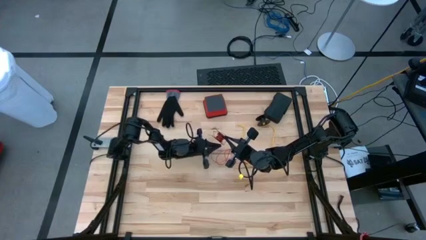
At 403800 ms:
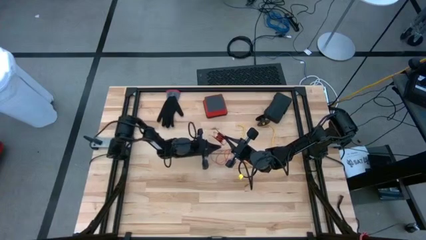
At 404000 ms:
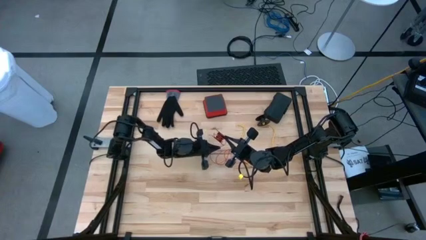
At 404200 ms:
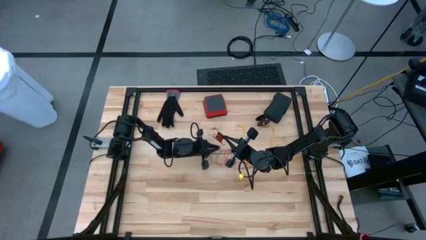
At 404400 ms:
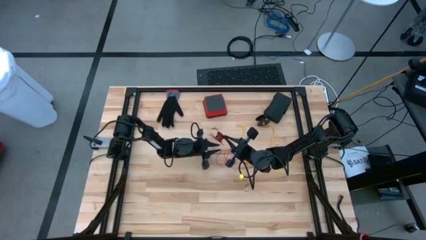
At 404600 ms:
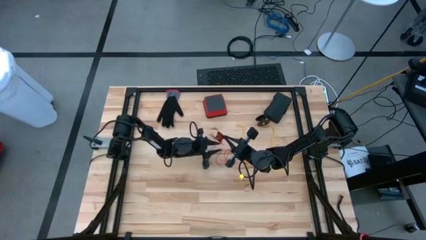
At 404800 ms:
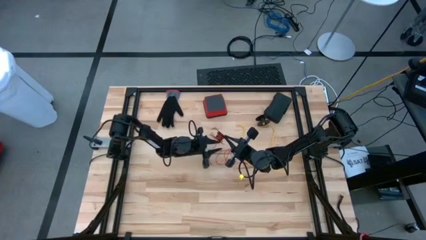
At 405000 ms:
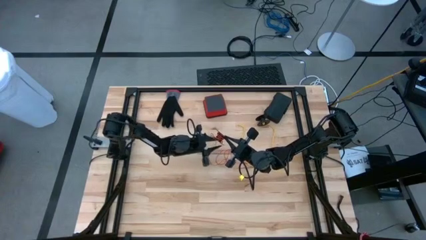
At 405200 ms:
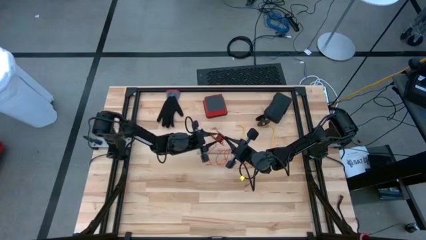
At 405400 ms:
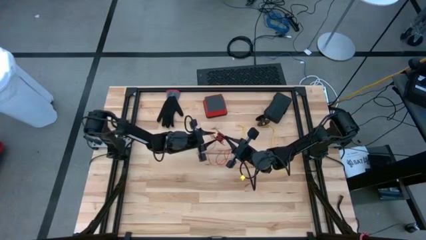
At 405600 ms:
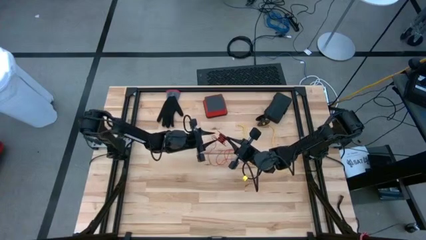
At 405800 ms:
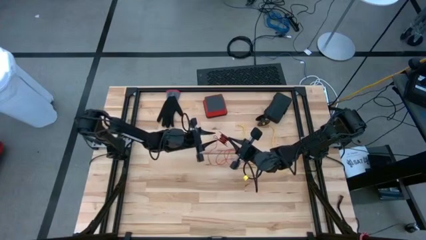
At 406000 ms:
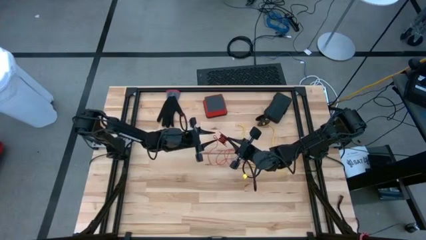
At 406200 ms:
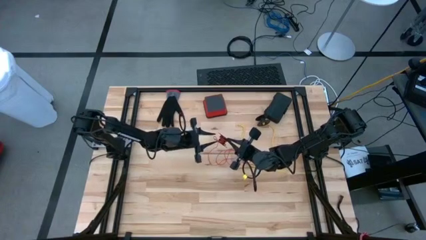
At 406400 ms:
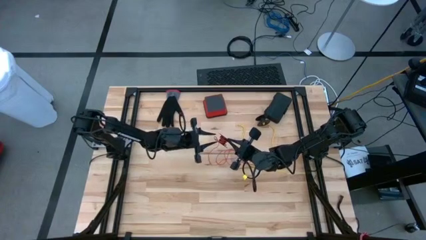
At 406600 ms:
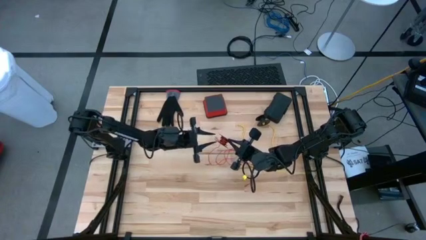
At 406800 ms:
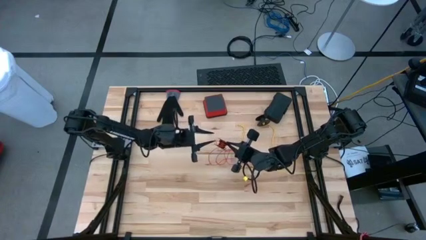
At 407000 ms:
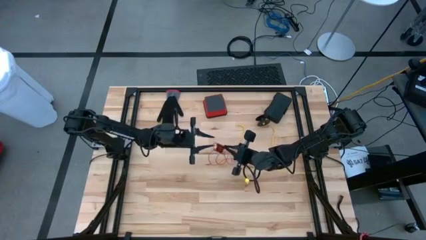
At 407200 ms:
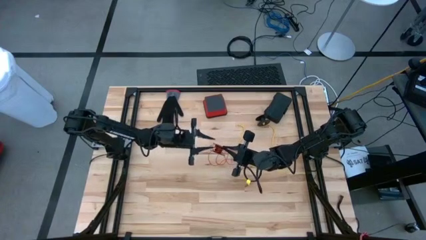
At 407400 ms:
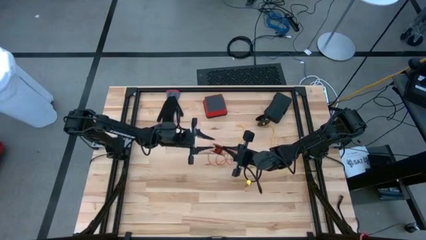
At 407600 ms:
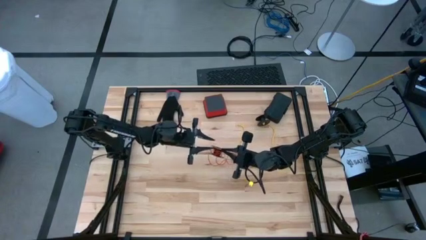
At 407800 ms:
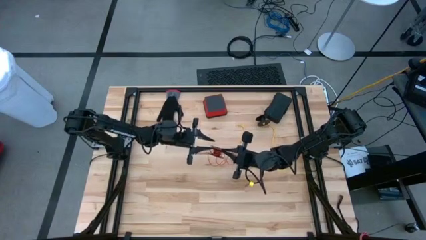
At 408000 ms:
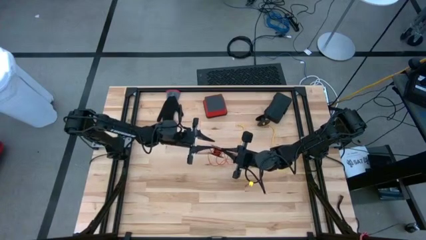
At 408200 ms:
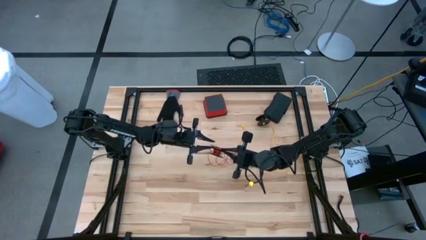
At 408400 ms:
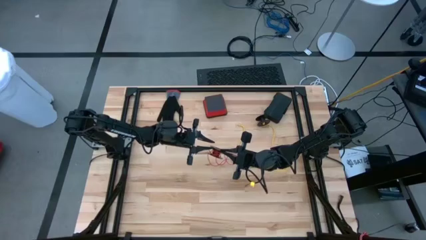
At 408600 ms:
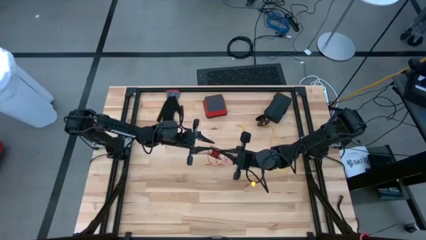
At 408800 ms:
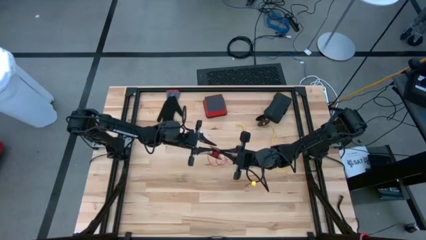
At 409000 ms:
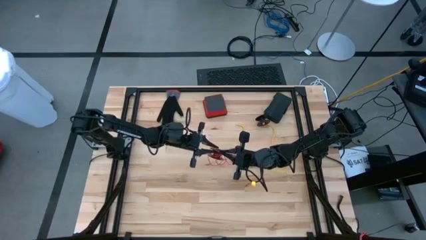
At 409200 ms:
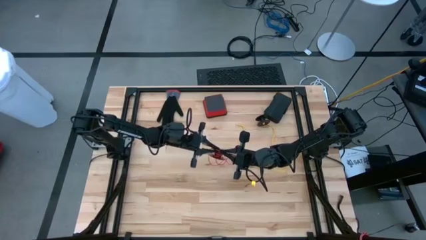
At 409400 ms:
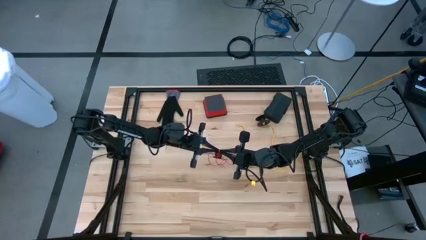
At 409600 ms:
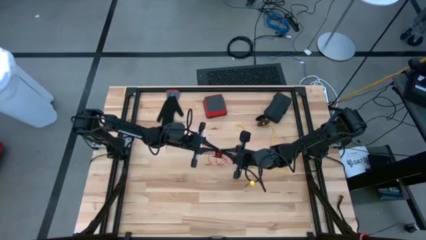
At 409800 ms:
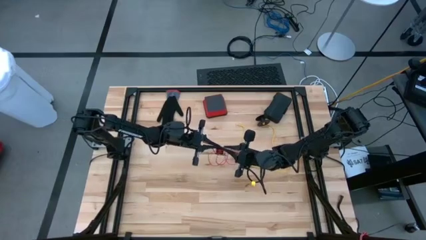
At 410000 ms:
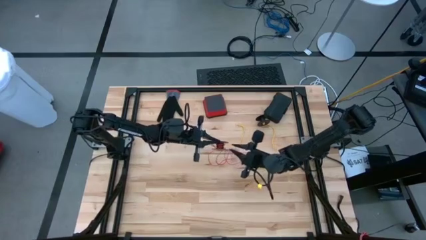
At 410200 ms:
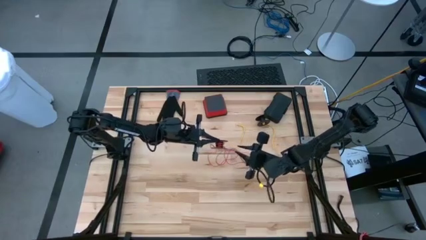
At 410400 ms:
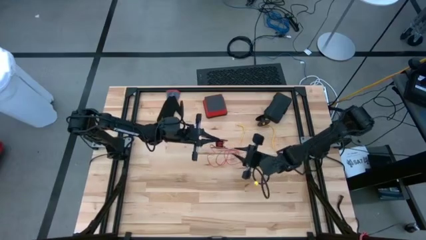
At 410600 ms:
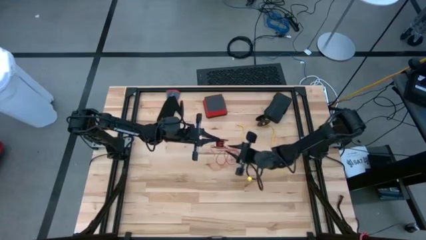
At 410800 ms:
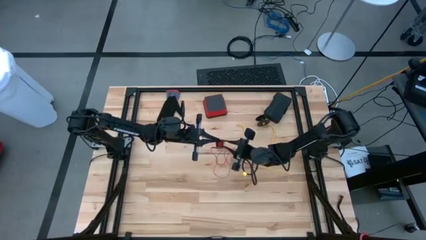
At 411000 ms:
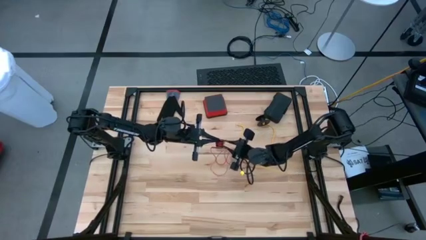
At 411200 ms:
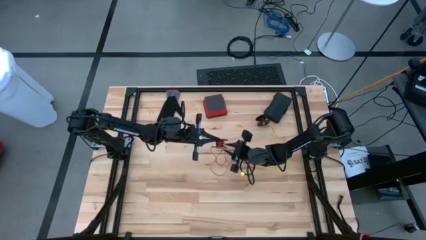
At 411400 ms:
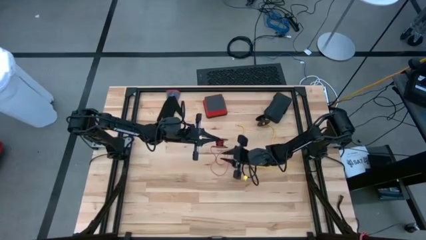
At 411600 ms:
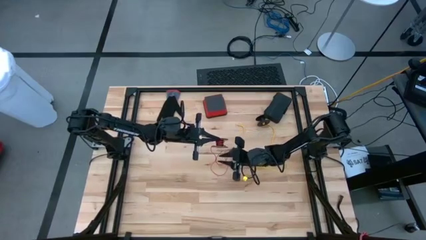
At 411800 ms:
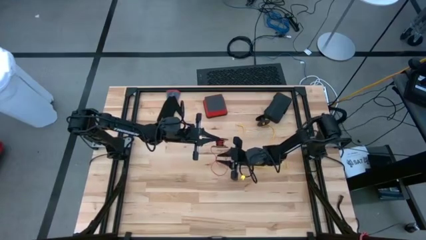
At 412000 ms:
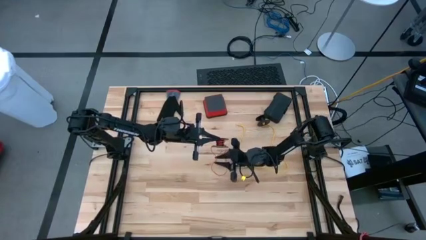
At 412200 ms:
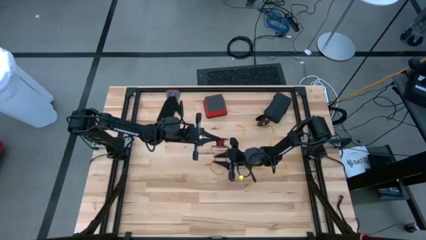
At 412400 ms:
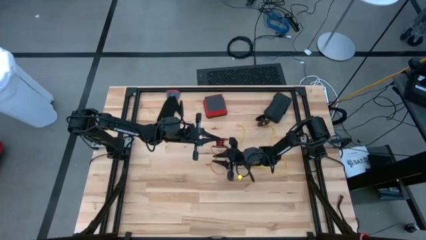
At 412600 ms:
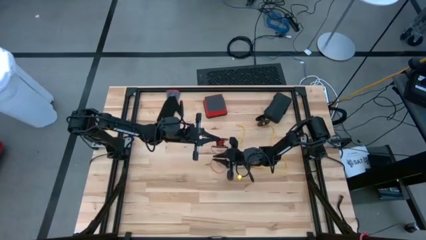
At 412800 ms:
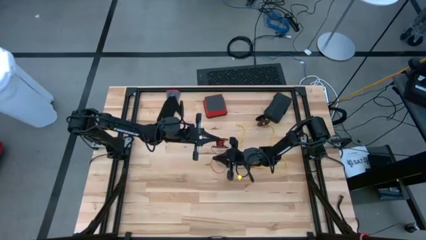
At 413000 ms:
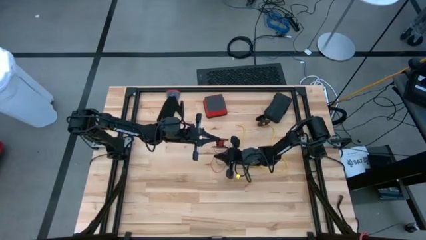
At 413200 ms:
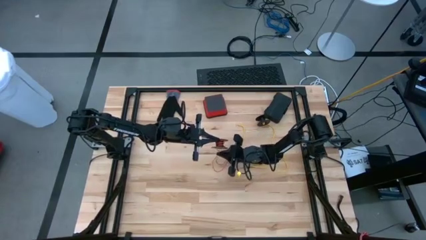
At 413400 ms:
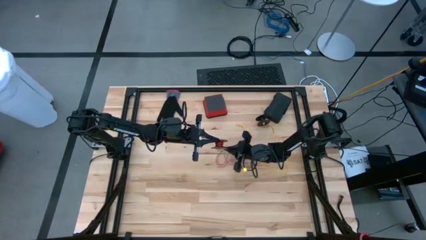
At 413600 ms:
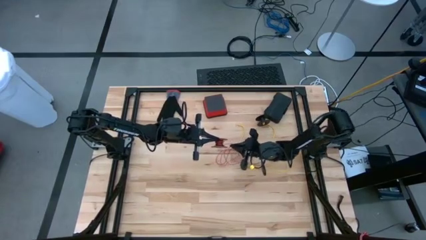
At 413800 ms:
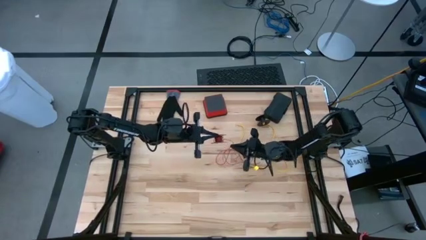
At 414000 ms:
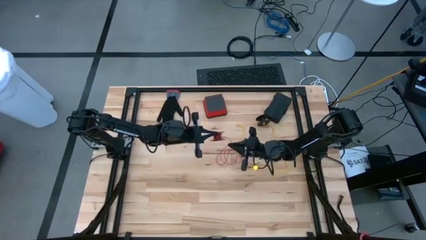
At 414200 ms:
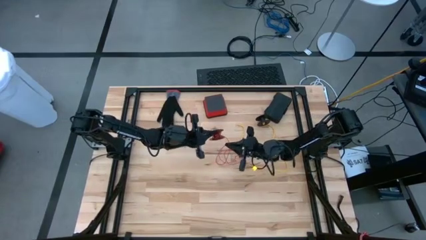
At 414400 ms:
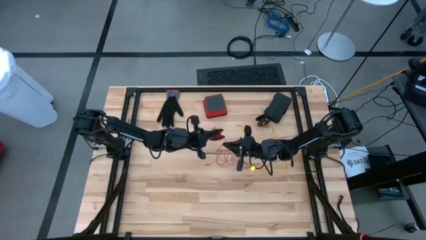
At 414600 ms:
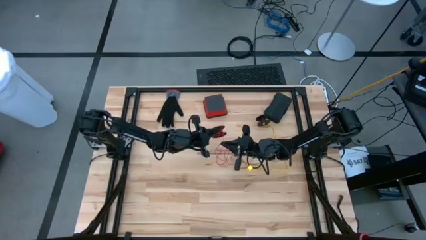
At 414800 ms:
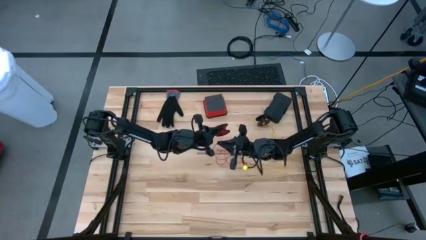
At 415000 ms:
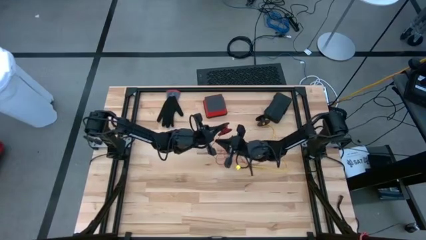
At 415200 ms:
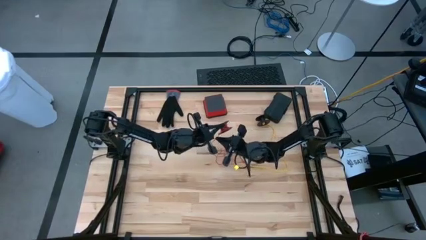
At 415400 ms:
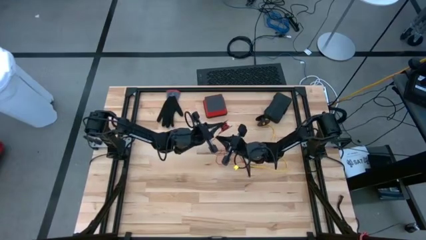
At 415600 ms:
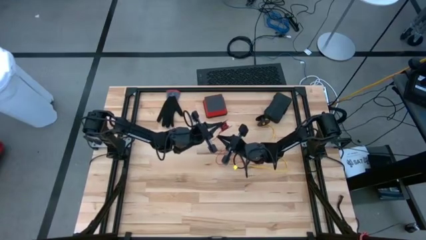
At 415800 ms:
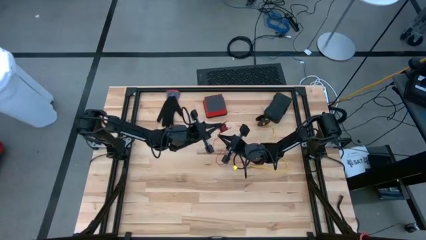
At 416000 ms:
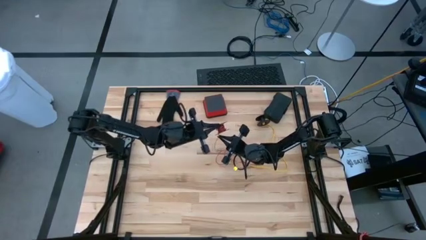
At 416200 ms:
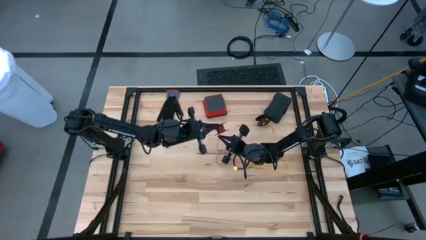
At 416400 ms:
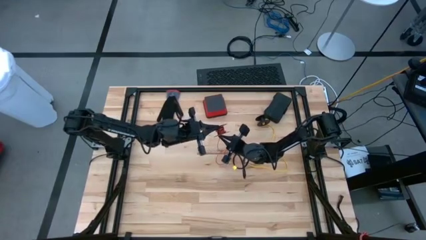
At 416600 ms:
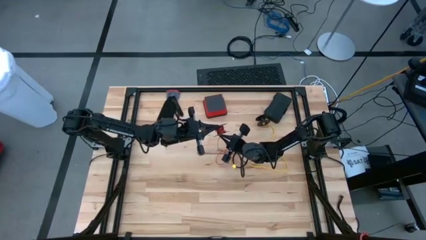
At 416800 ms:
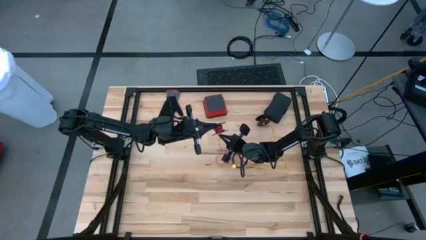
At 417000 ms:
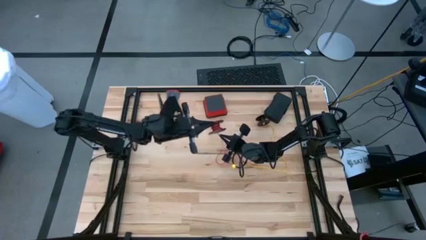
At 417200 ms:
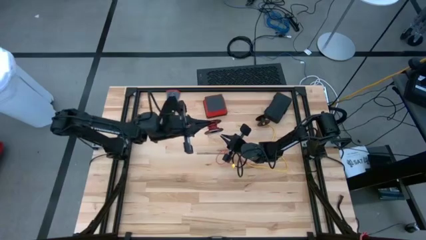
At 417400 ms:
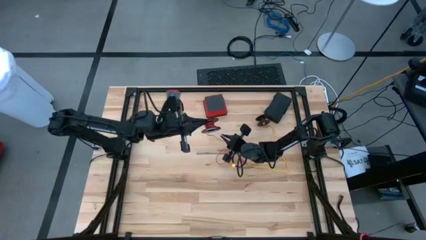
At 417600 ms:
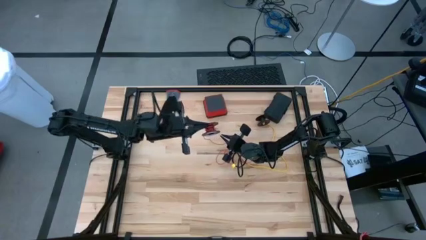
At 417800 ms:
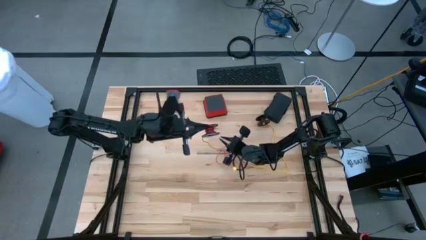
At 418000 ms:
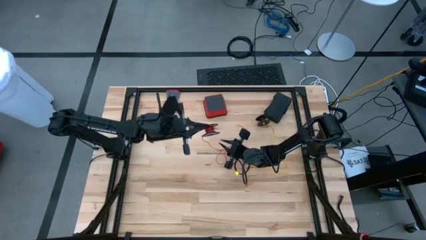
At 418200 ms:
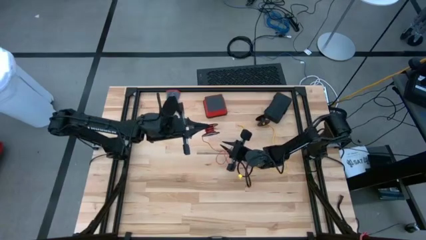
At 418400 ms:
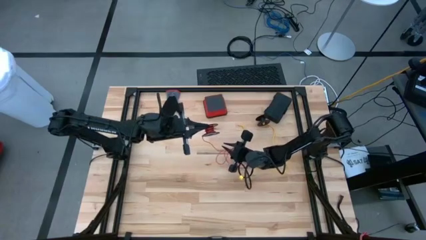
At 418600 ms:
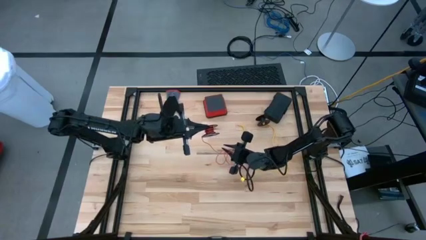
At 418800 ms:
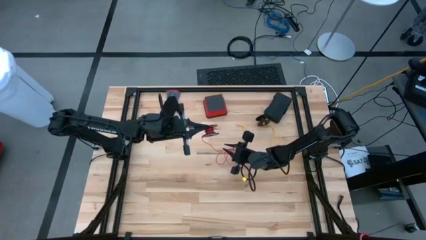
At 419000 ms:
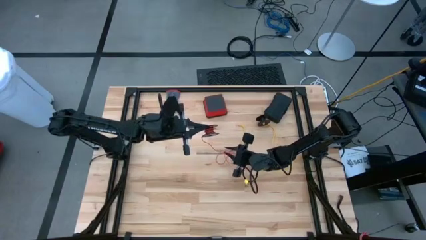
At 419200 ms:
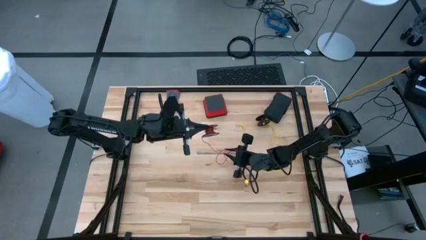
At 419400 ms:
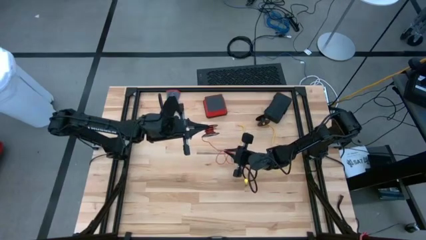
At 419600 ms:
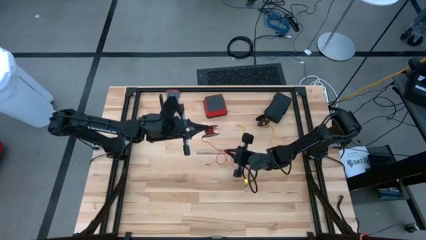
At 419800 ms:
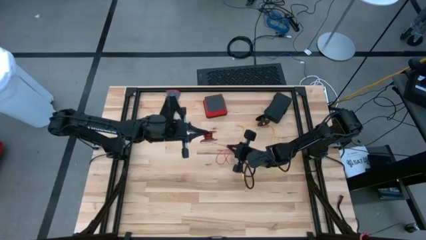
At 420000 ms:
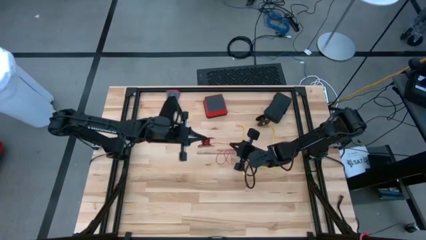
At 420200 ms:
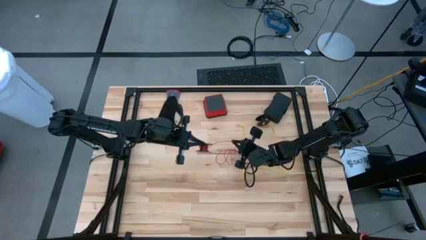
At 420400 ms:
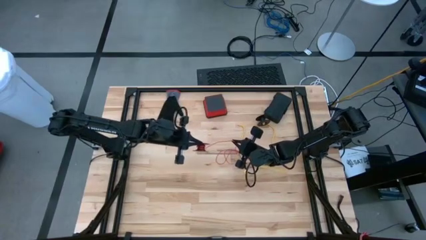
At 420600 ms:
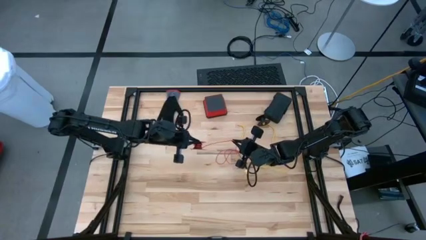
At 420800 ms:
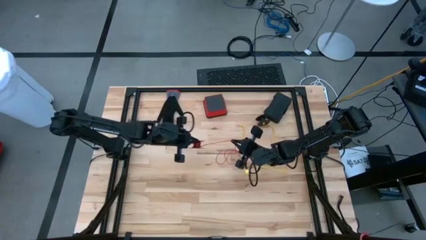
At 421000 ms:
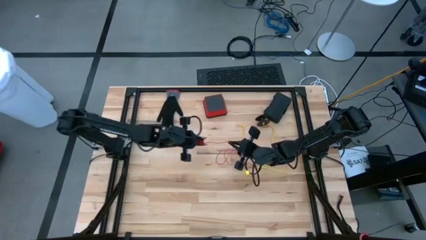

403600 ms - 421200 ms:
Task: Coil cords
Coil the red wire onto the spool
